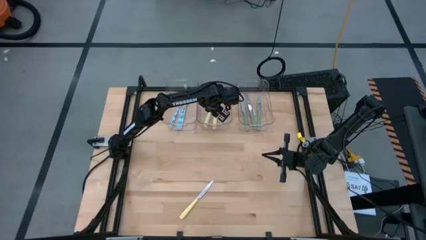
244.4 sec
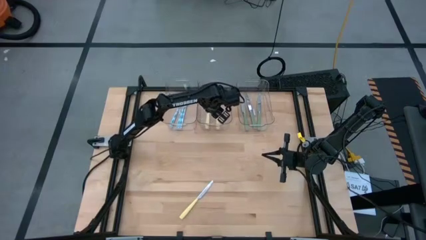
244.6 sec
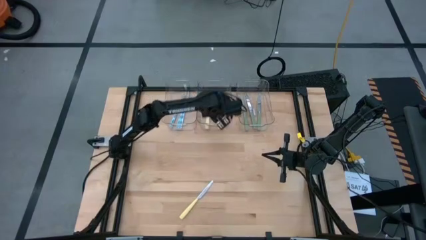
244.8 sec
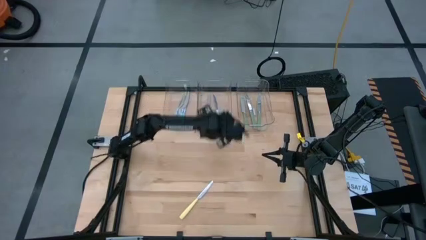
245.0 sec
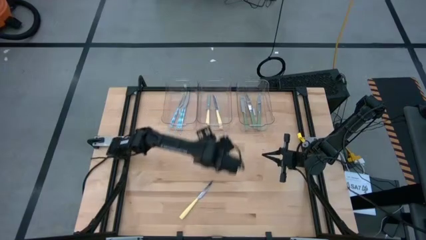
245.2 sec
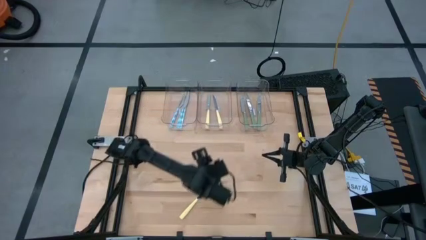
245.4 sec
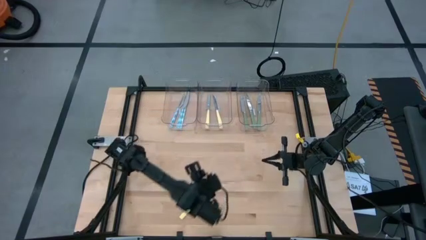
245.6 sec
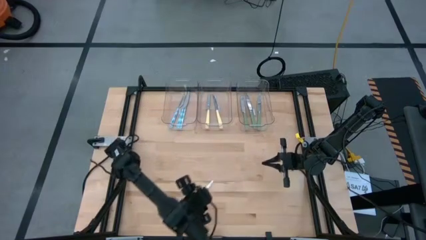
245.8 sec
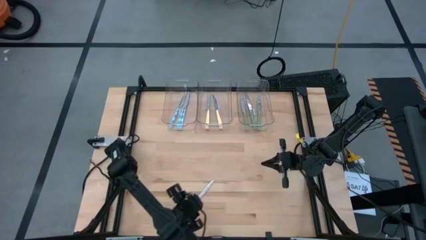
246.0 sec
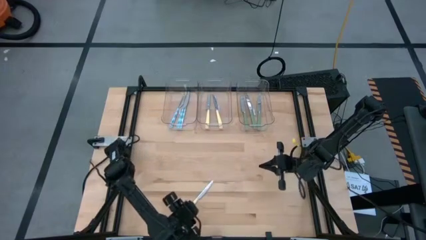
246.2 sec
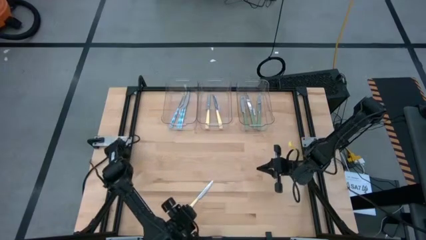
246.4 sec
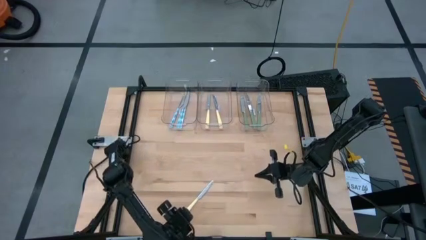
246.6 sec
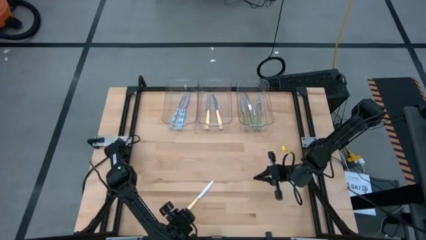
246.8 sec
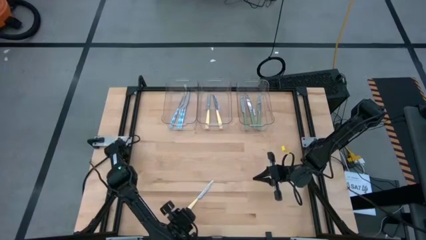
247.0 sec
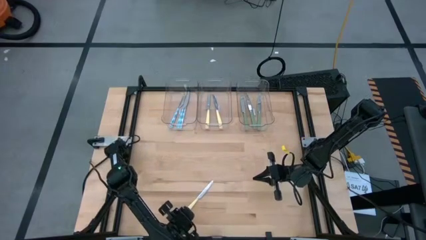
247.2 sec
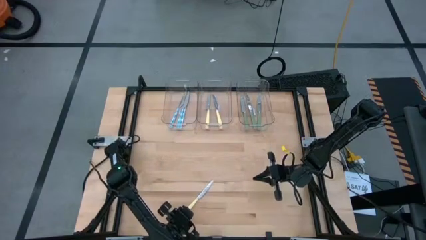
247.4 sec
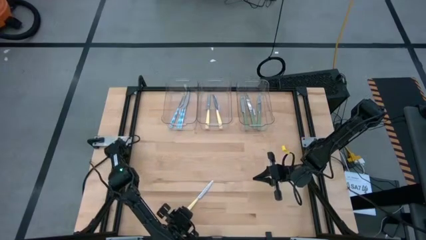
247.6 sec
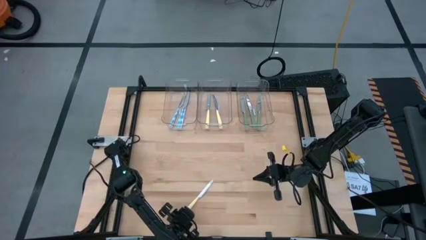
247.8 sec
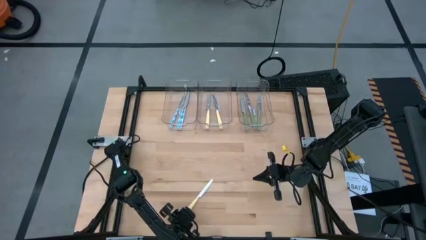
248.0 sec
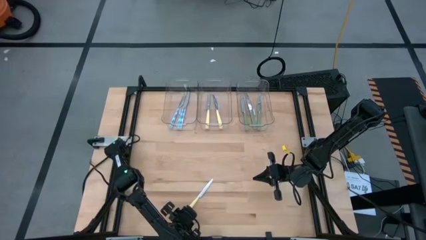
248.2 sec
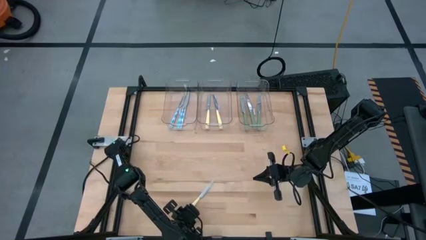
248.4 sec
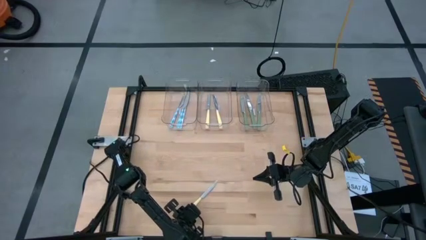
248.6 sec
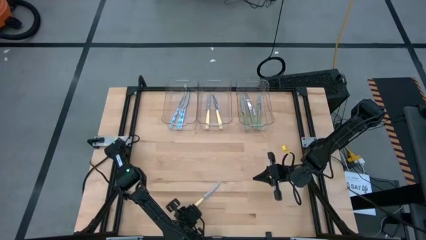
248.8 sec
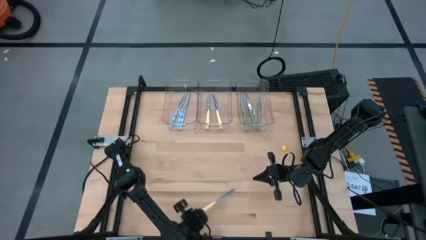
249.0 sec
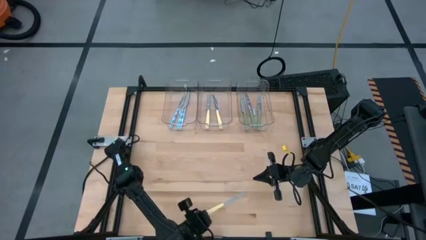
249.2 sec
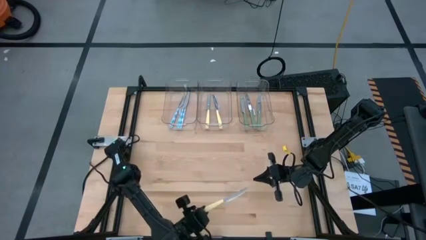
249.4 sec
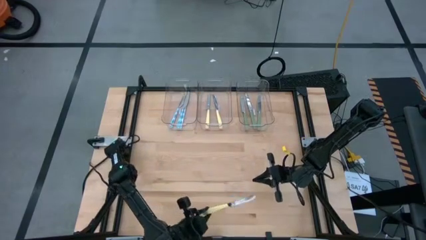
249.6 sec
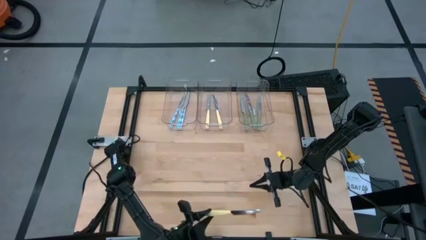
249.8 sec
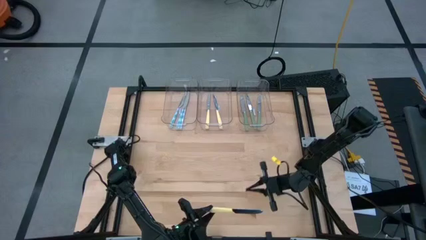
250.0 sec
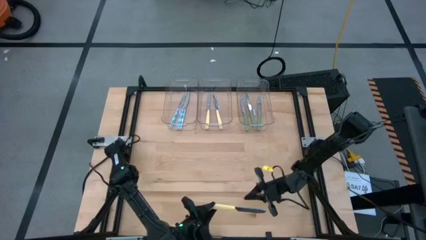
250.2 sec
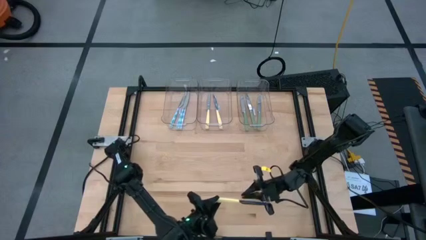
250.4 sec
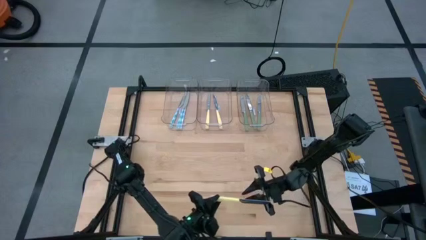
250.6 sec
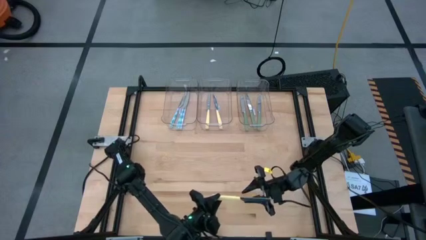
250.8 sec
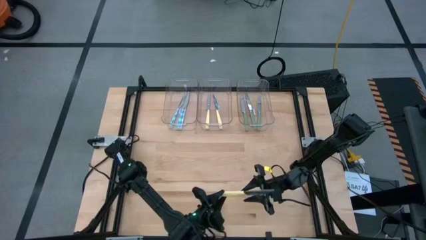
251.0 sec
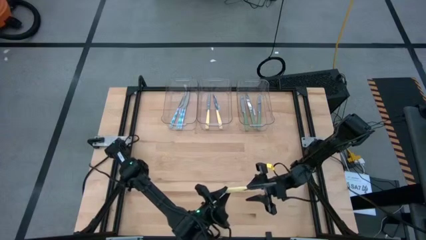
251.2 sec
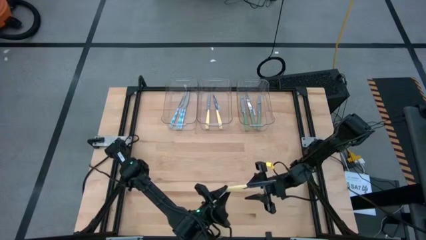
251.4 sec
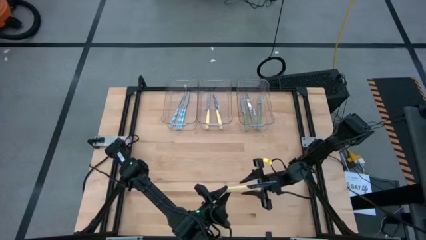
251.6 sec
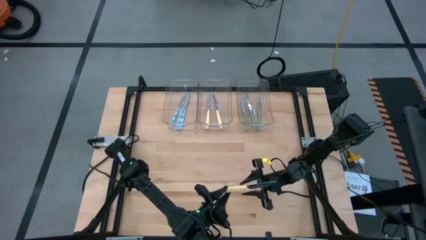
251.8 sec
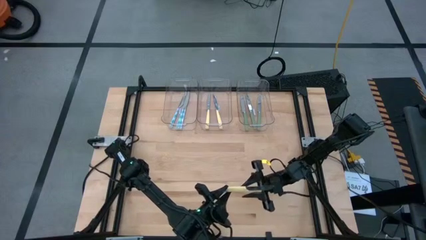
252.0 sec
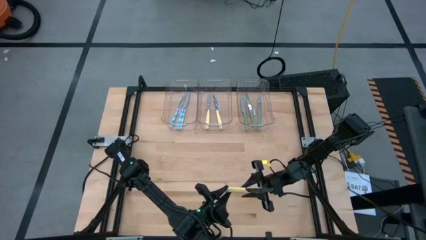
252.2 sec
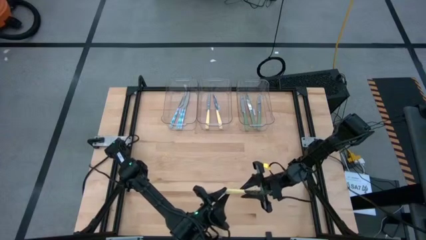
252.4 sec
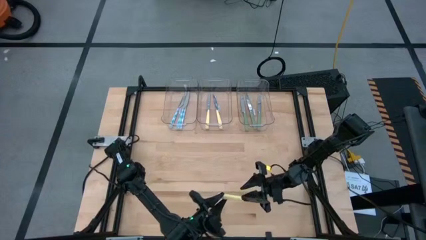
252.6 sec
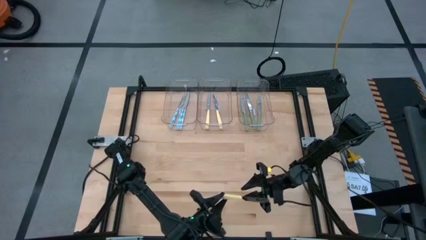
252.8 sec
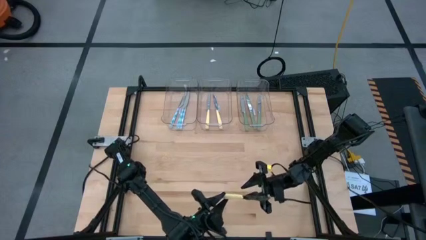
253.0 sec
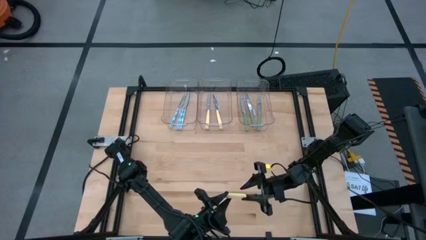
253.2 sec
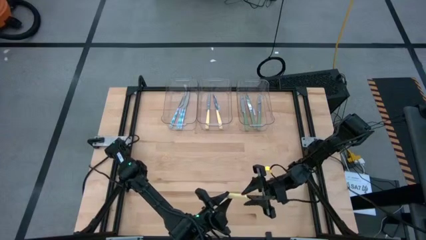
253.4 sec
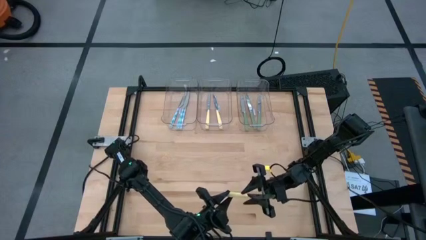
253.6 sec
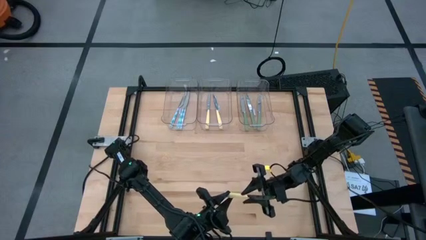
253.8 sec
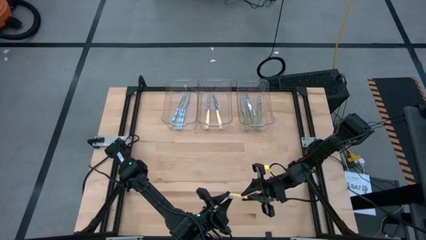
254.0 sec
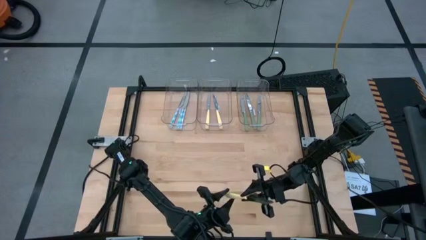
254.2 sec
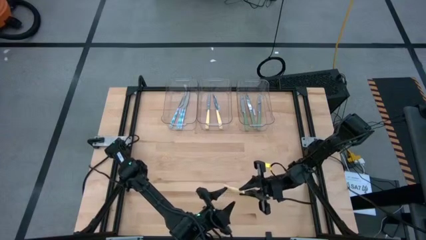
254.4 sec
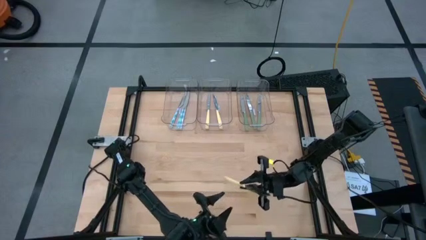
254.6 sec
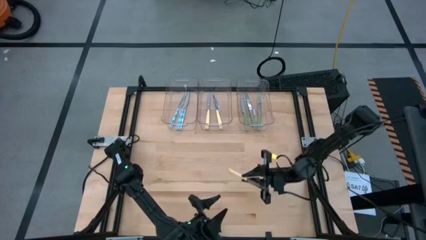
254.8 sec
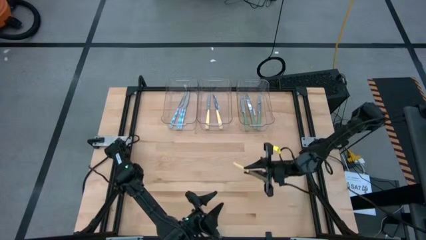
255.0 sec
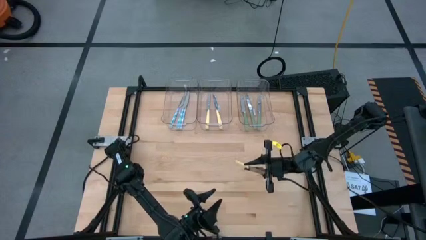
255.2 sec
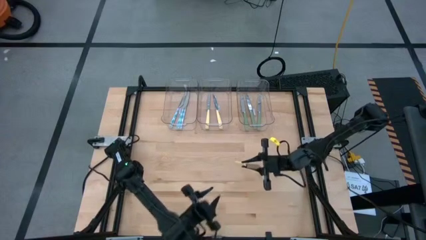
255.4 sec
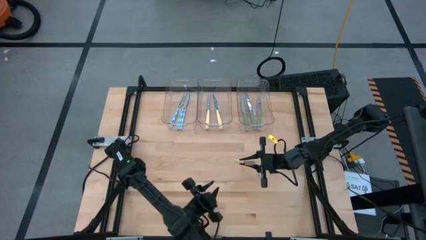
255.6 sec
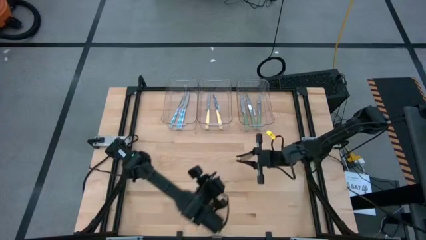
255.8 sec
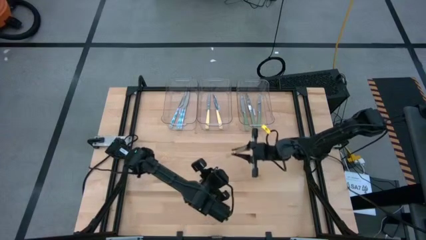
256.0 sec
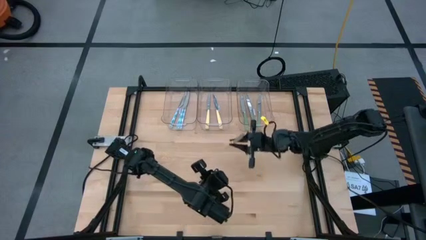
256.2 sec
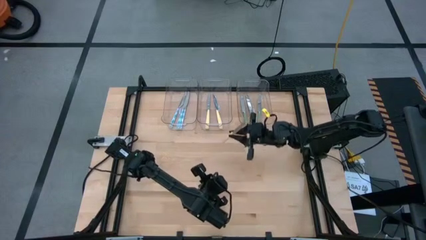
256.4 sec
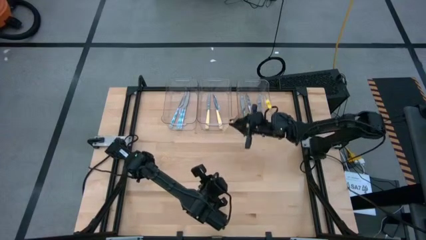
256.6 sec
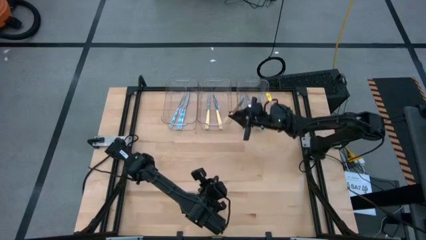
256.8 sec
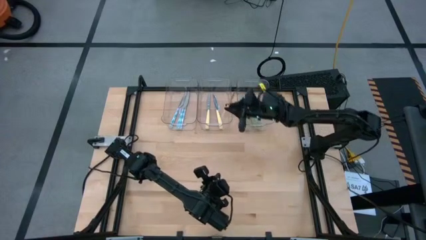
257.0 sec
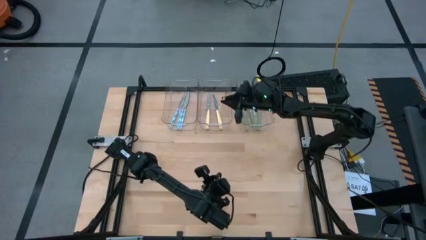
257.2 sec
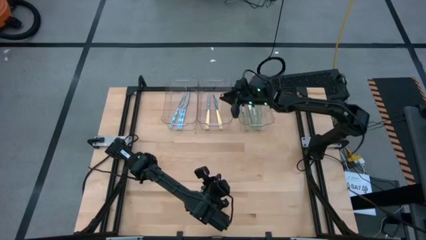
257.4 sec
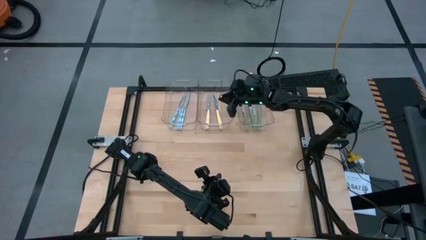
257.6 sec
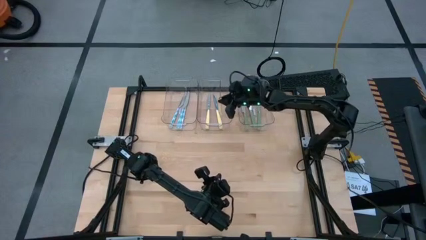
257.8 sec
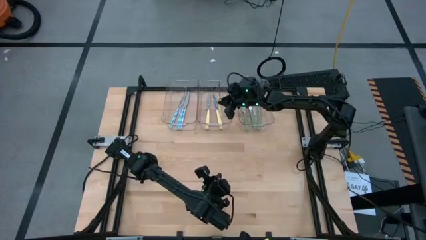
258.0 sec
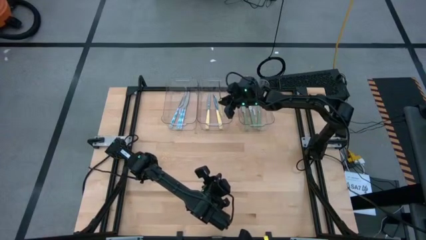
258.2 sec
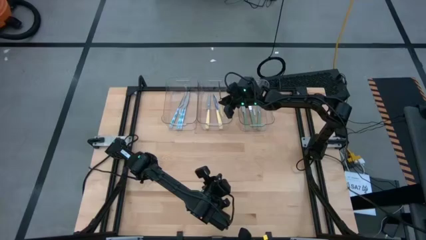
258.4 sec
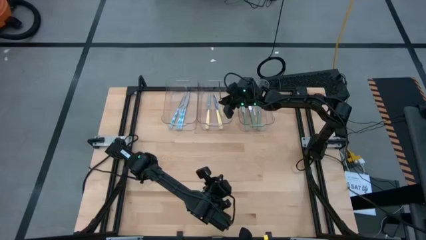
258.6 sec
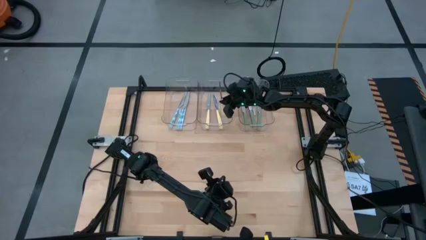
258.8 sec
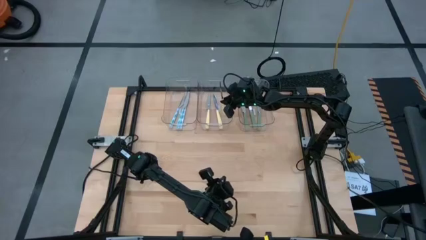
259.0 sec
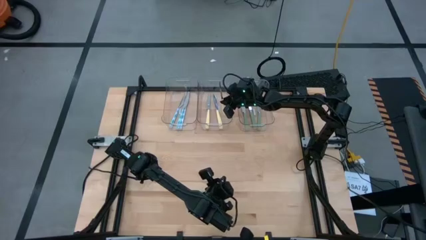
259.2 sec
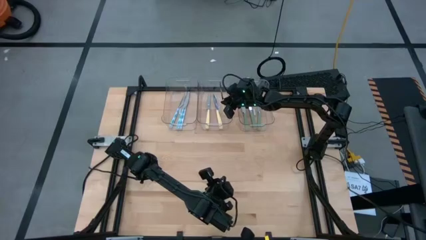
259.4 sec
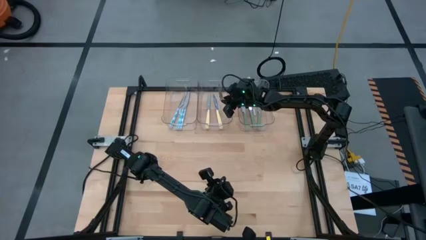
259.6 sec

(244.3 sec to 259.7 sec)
Task: Sort silverware by color (type)
Put the yellow knife into the middle transparent bin

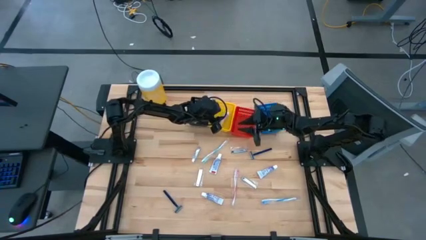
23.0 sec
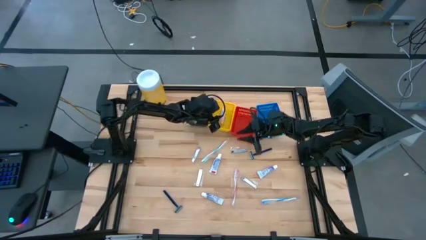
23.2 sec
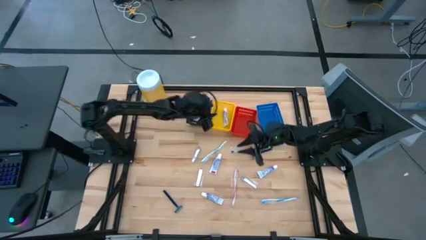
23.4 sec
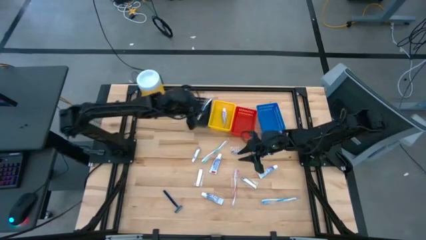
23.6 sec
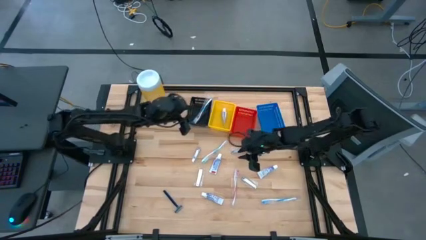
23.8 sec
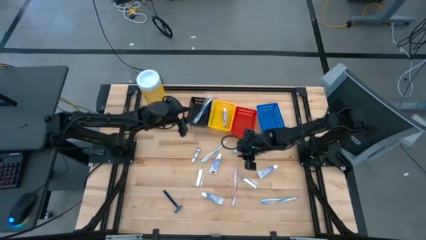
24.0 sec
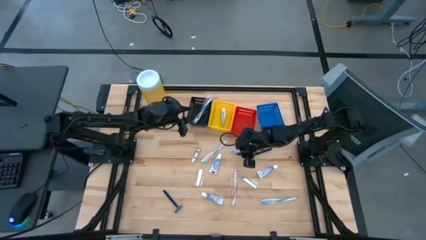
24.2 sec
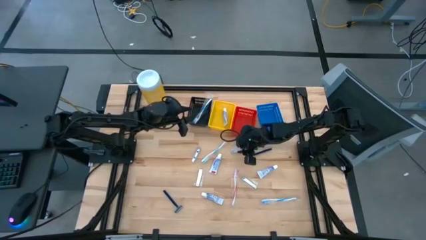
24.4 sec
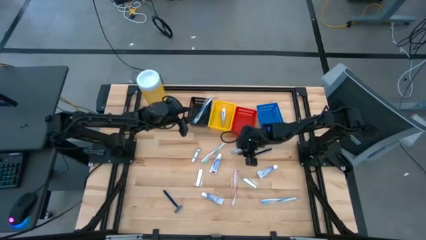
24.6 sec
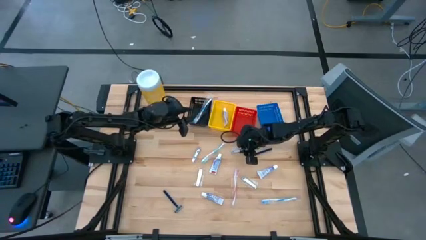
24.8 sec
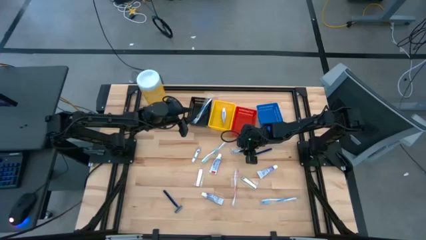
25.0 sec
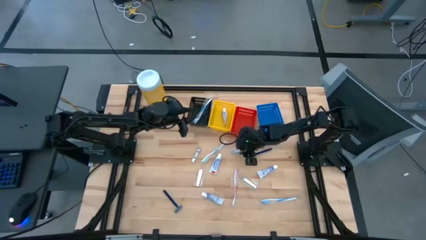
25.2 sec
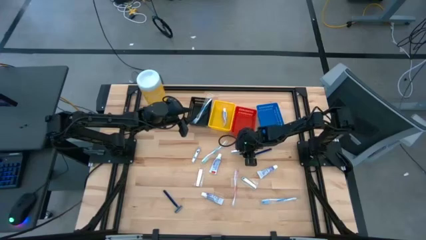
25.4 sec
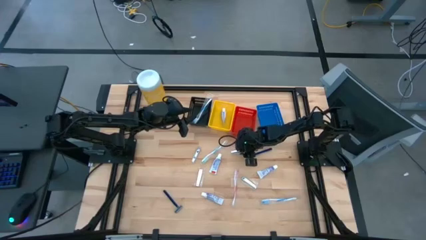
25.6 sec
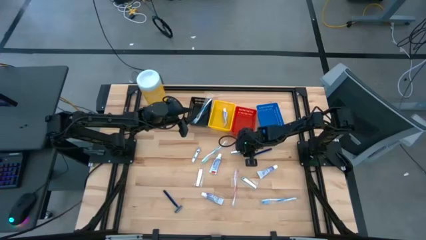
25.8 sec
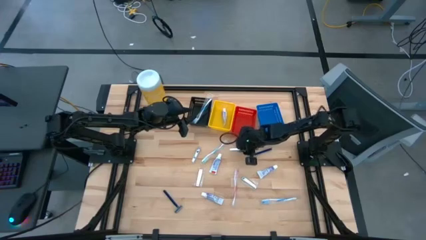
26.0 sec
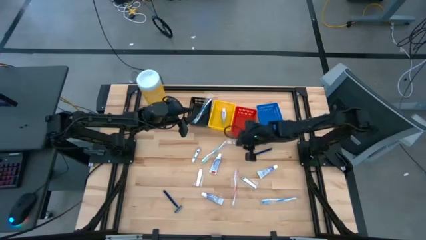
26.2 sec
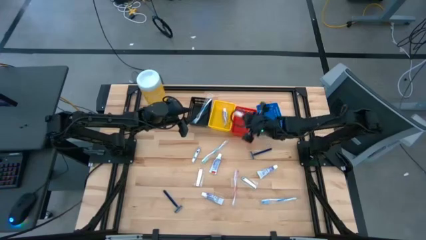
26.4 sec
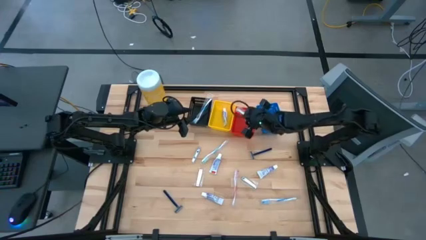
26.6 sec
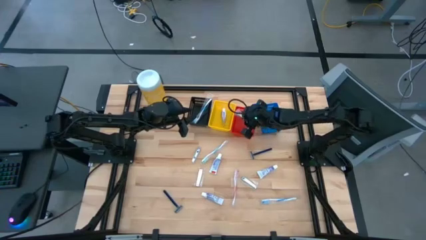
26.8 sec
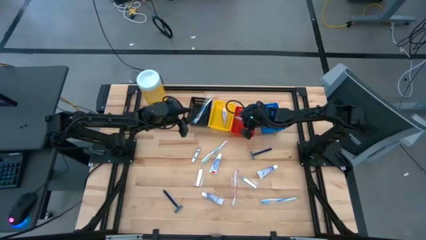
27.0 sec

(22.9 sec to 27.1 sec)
Task: Pick & Place Travel size toiletries
Put the silver nail cutter into the red bin
